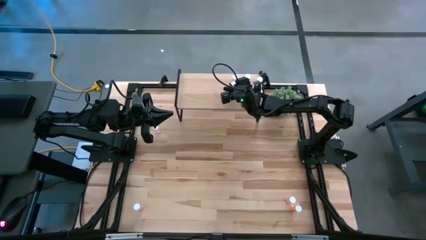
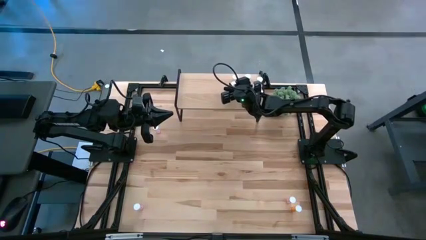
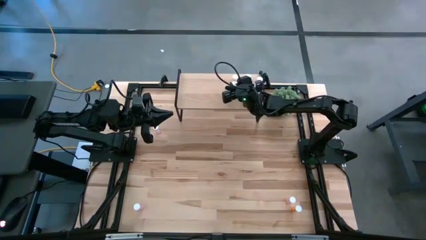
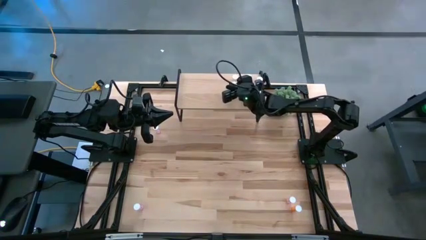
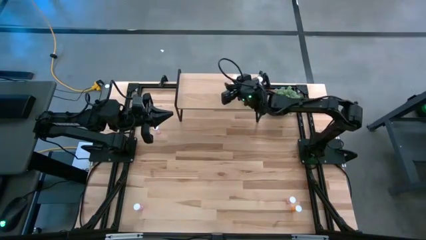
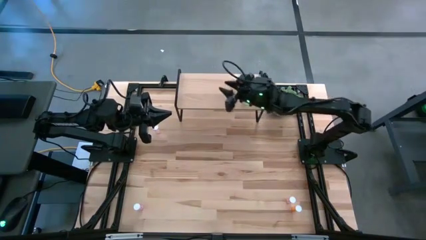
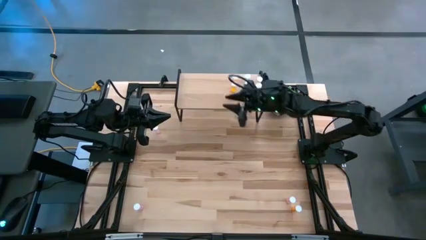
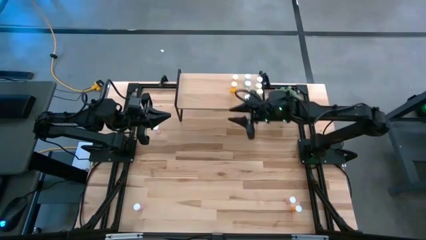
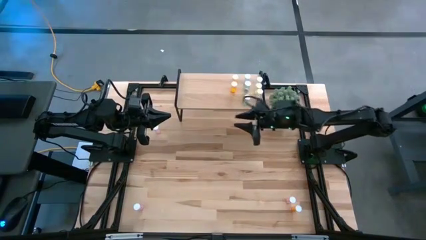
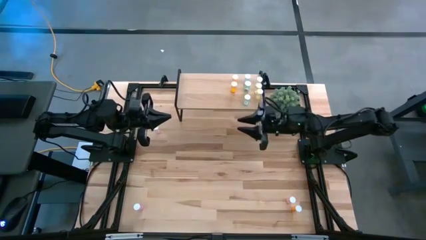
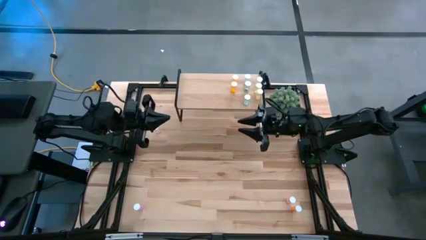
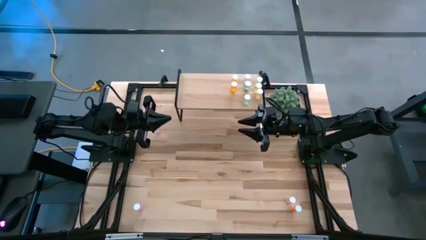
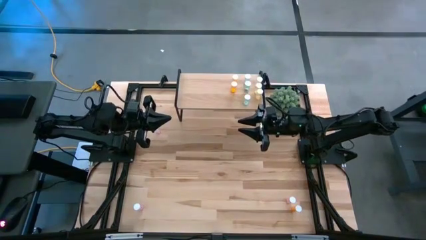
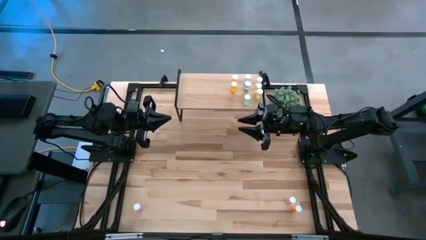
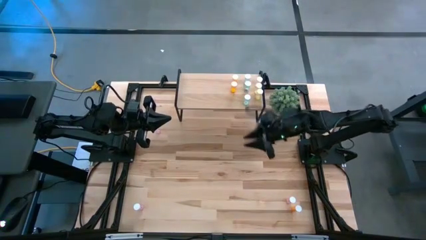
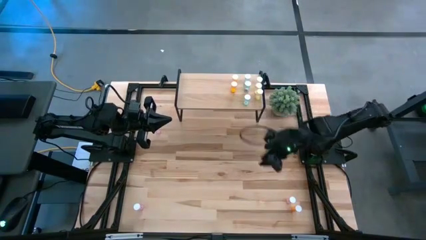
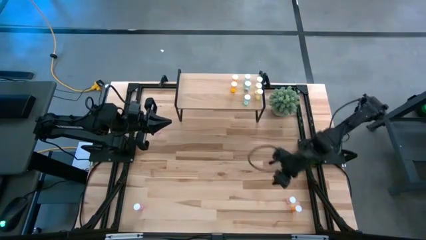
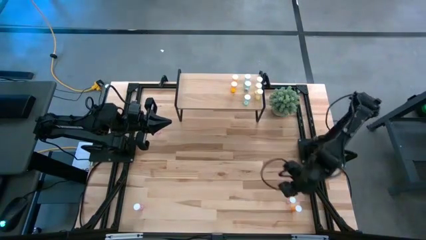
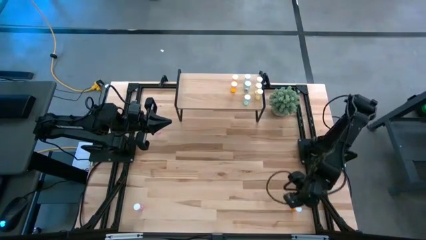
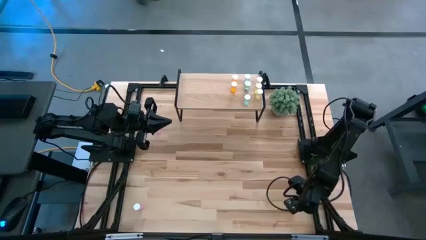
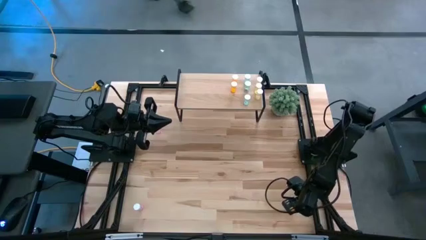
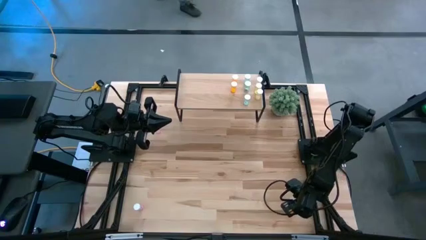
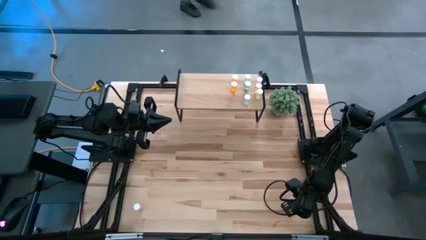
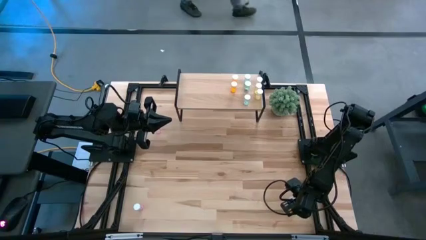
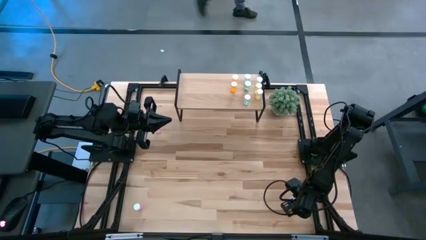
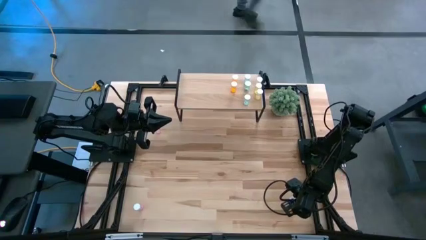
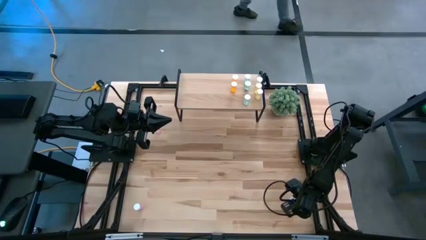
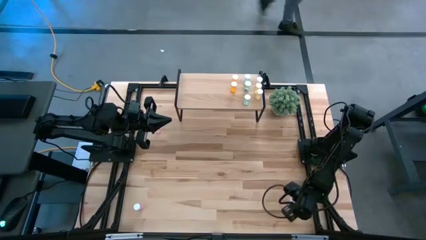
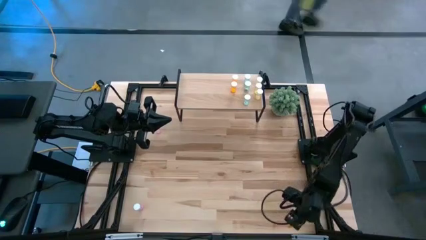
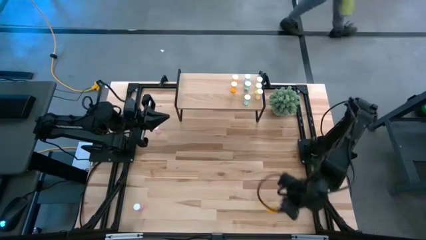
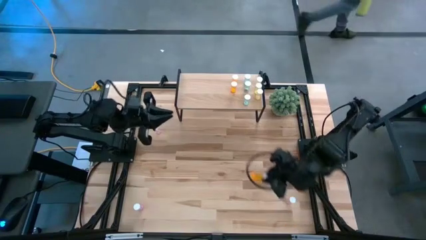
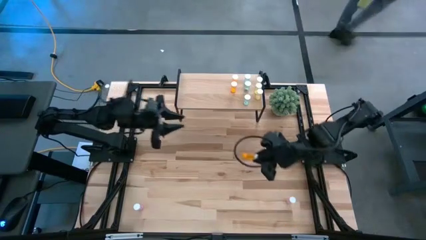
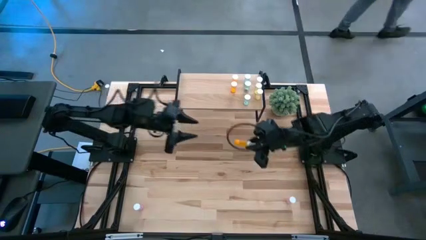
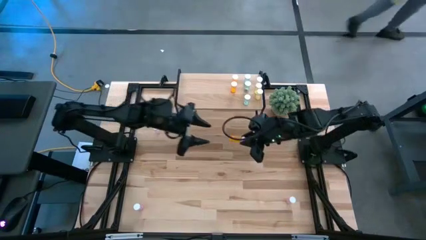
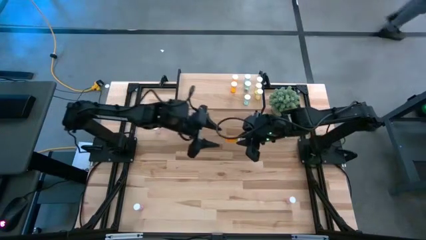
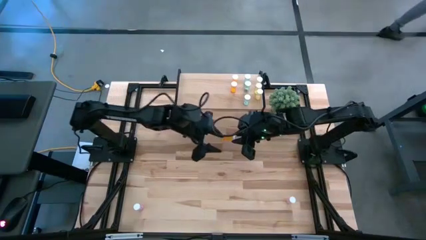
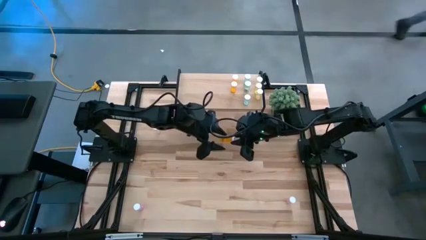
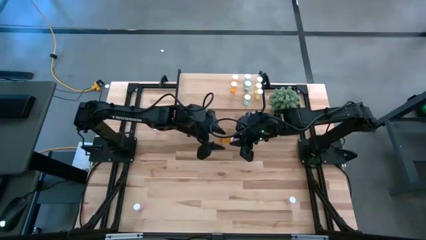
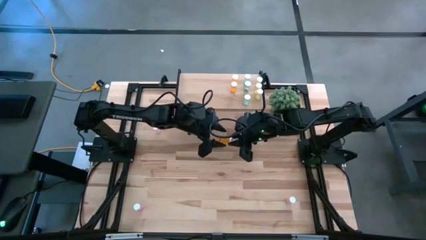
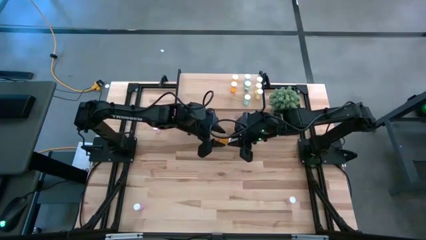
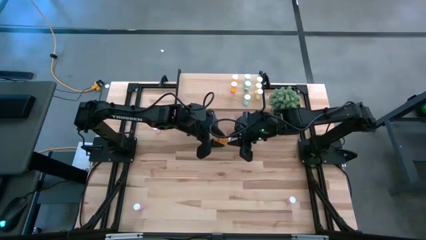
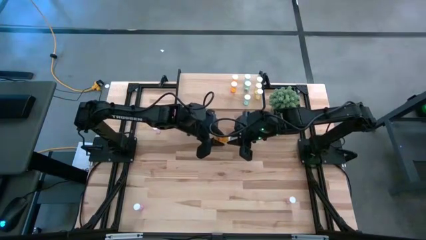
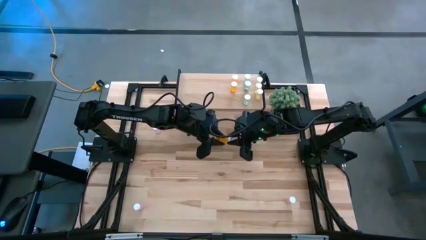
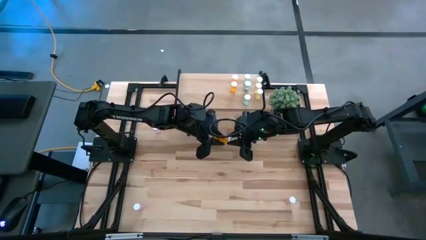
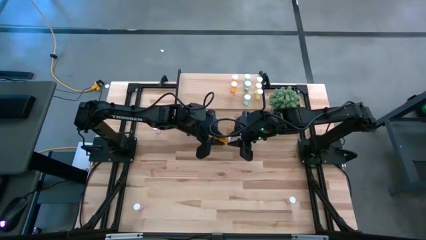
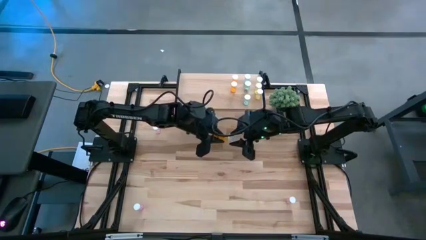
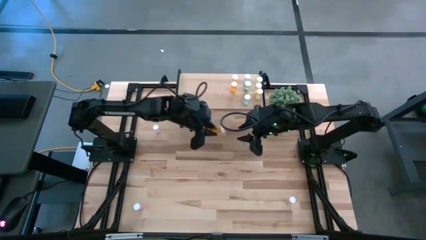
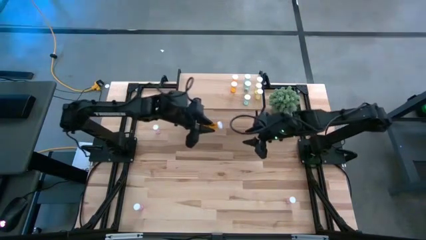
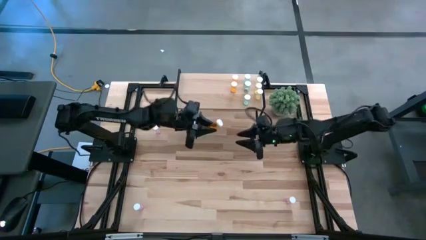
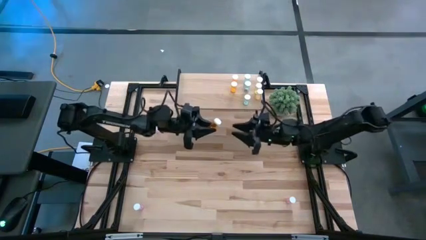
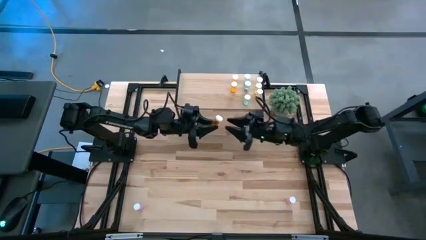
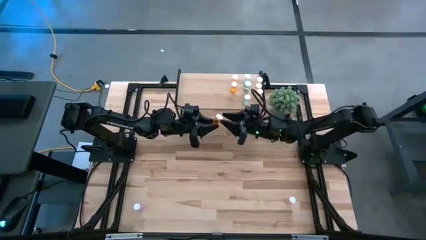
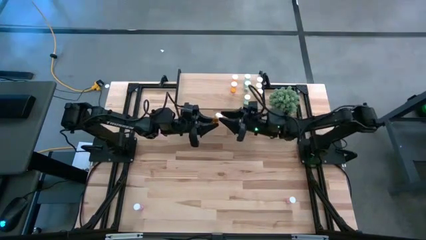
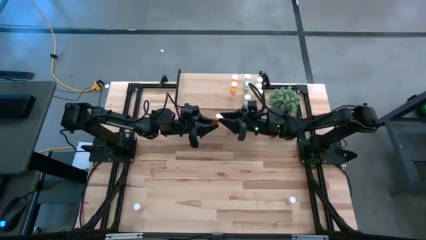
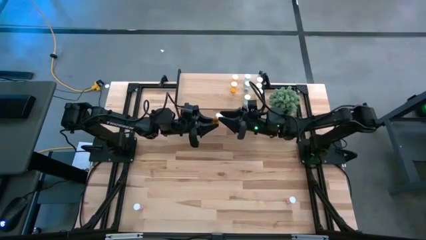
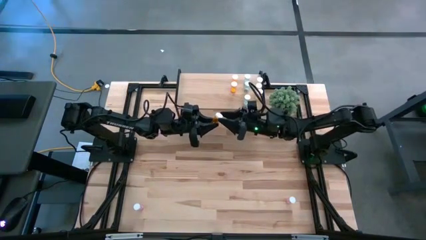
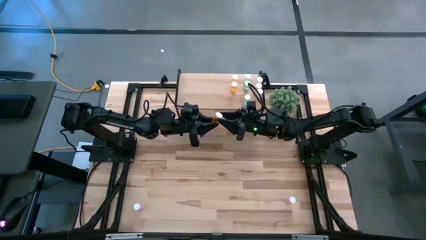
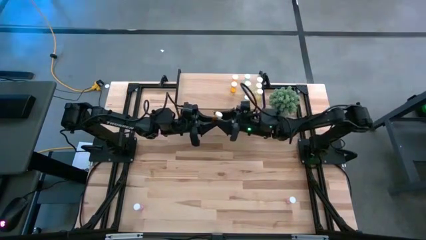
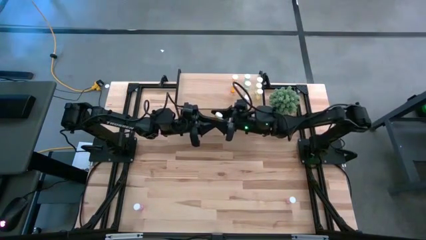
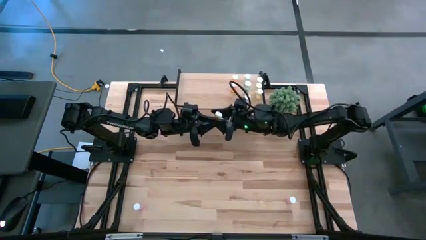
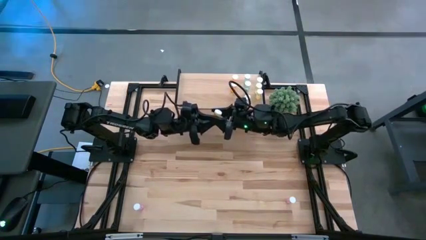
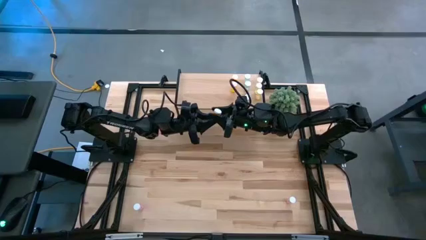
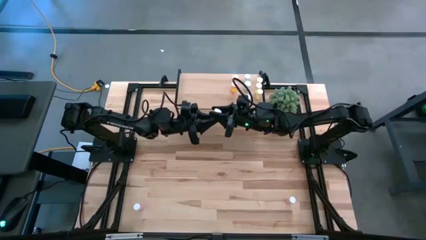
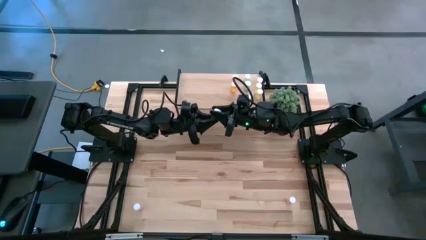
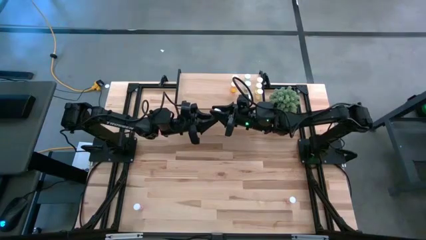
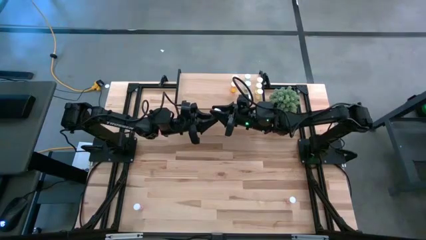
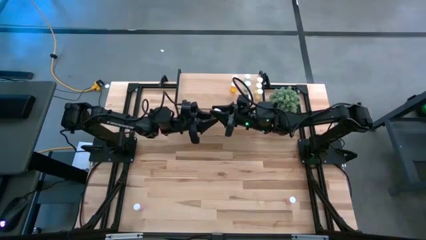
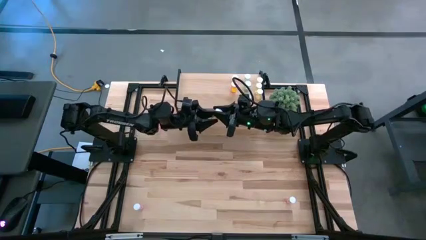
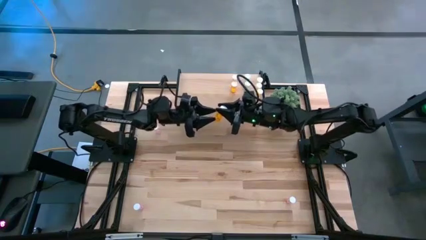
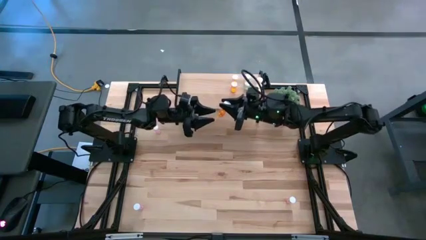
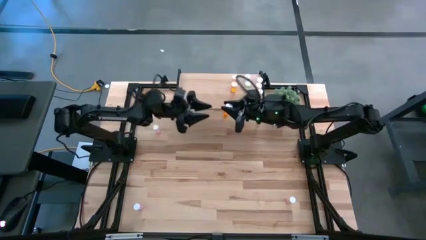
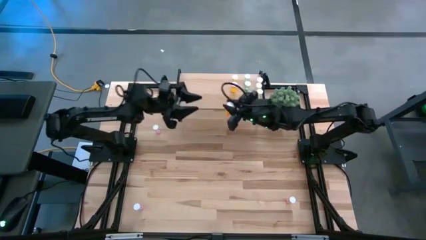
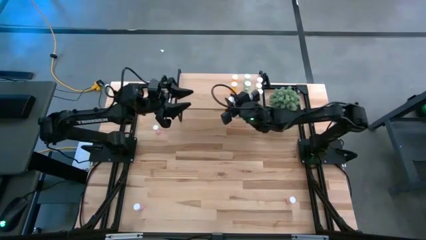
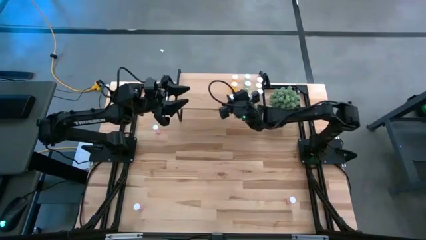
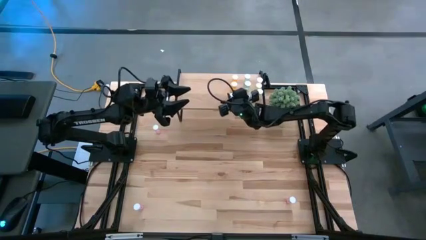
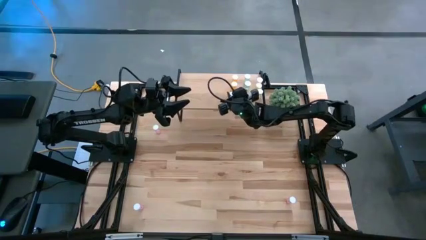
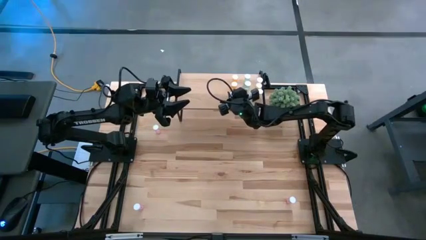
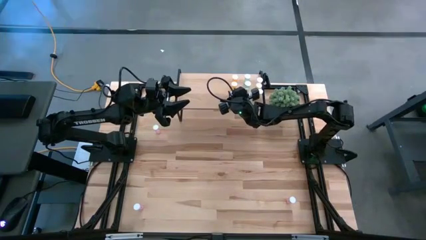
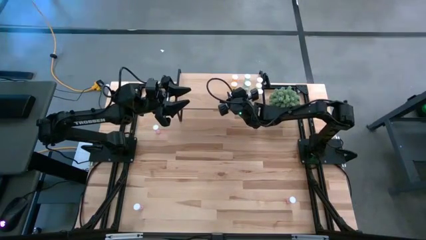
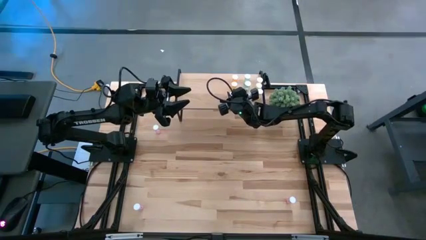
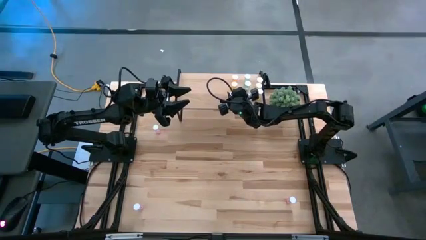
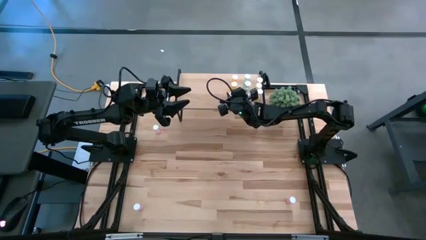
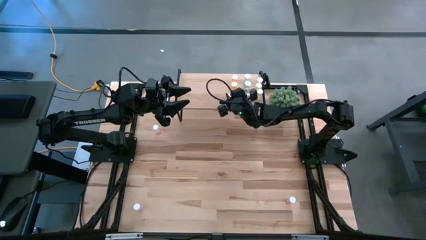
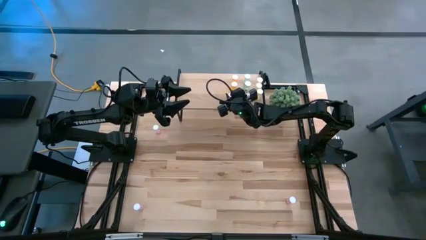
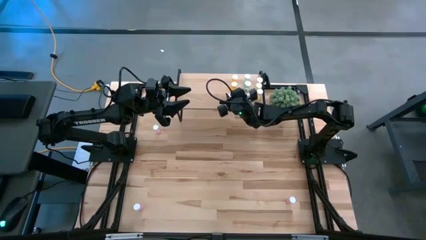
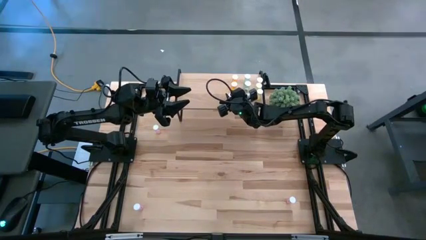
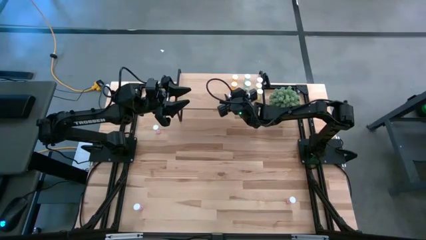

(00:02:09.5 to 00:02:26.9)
Task: Pick and place medicine bottles onto shelf by color
Put the orange pill bottle onto the shelf aligned with the other orange pill bottles
